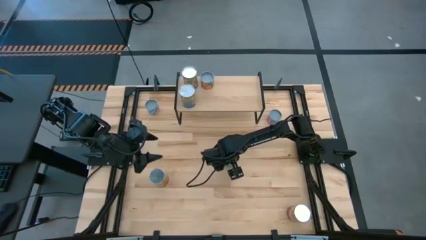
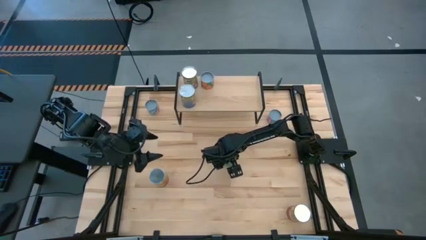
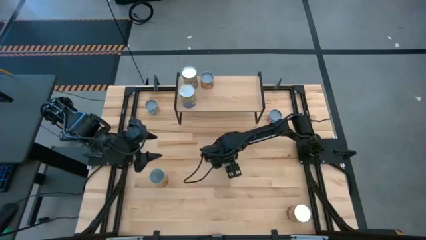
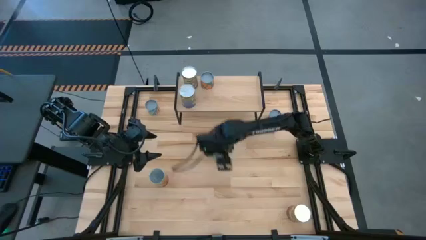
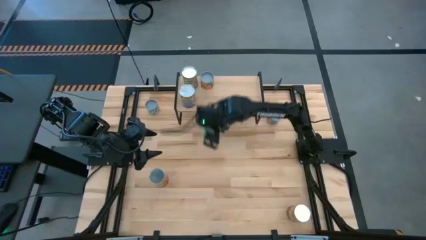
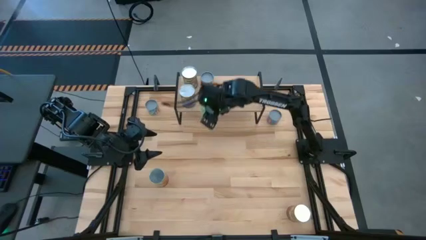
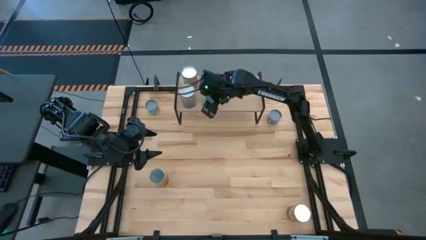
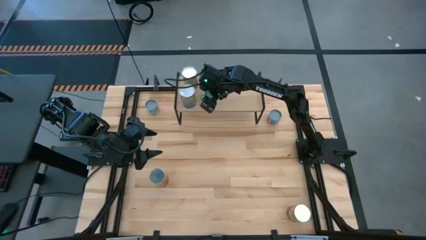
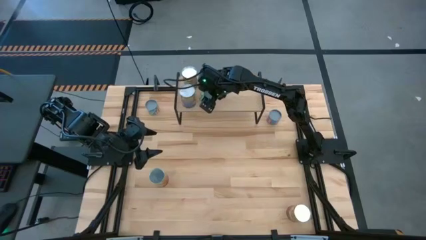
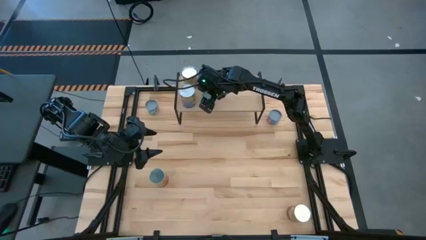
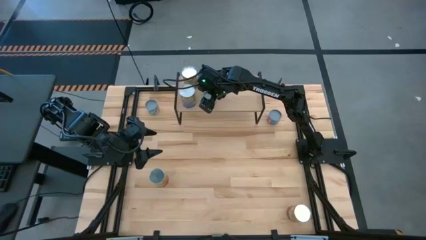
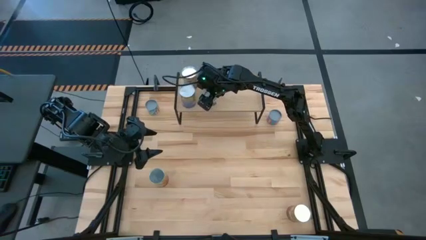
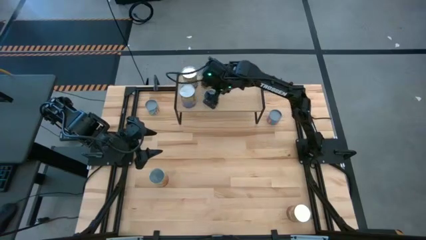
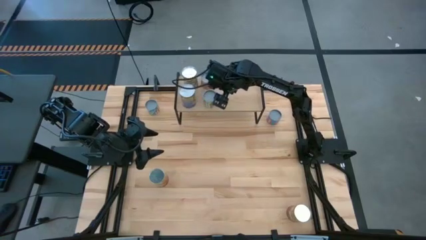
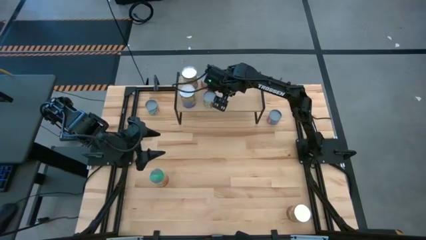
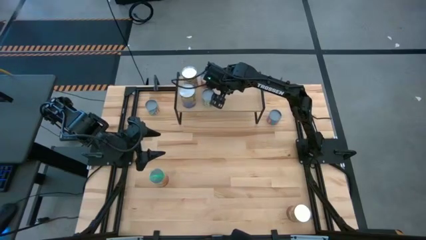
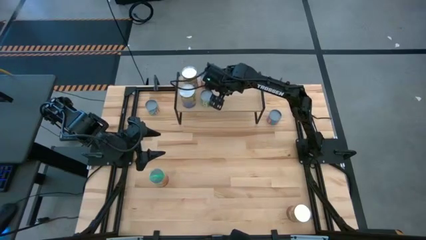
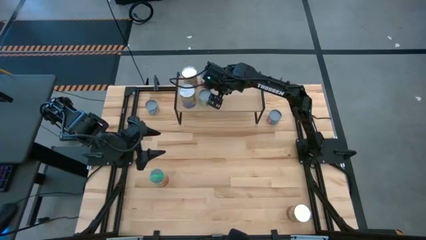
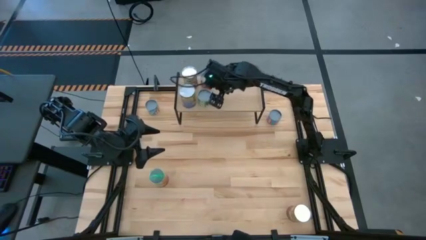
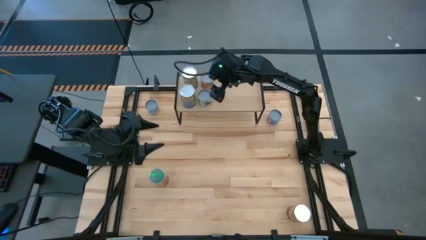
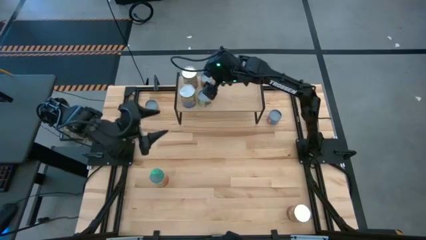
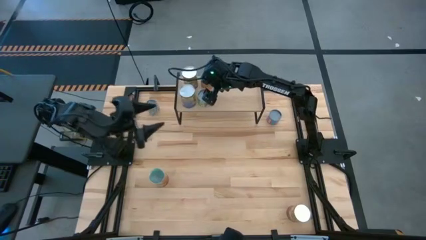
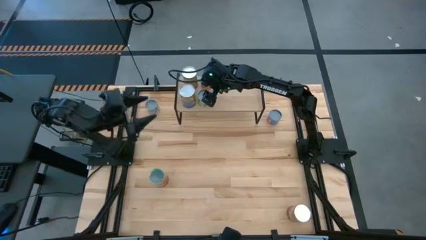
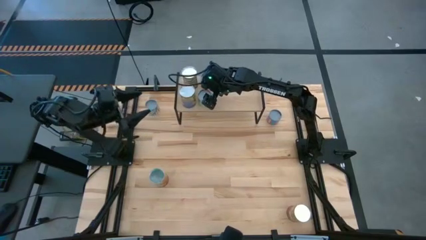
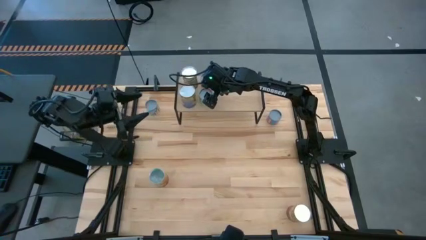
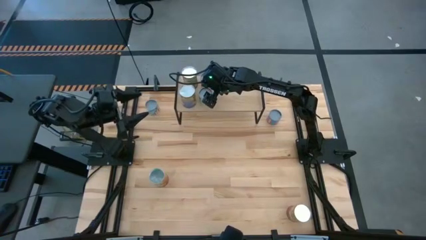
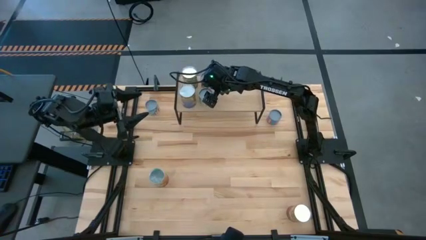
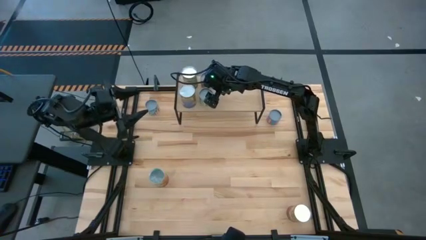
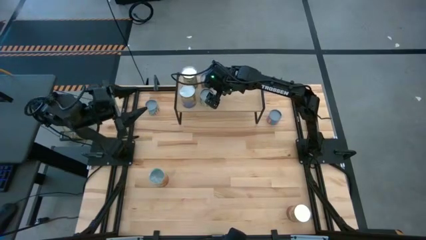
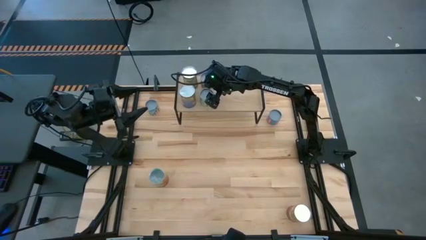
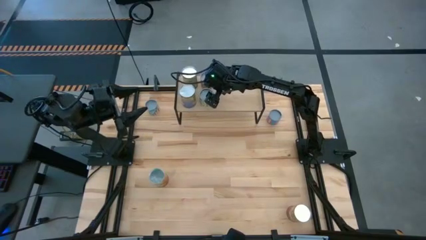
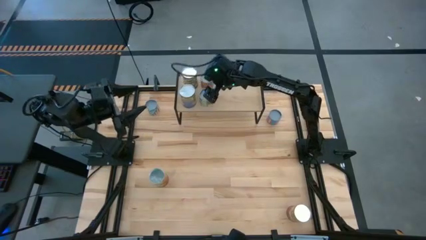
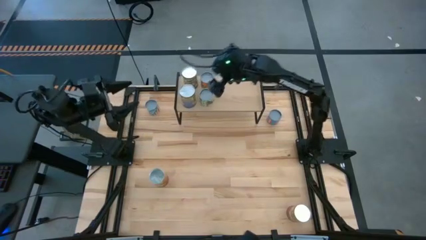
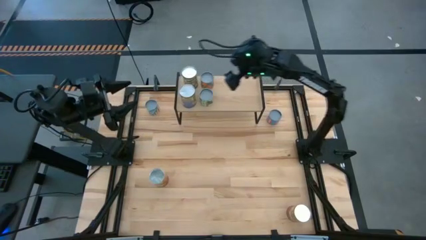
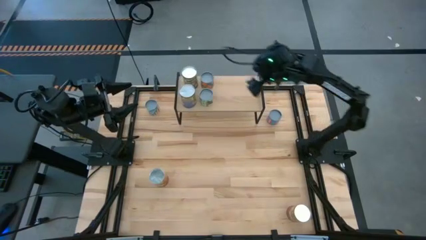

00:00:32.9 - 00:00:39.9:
Task: Pick and place cans onto a shelf
Put the center peas can on top of the shelf

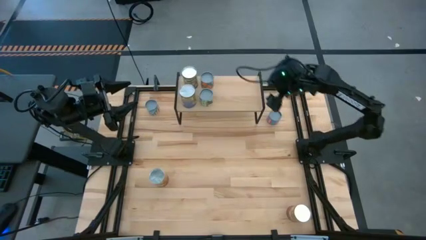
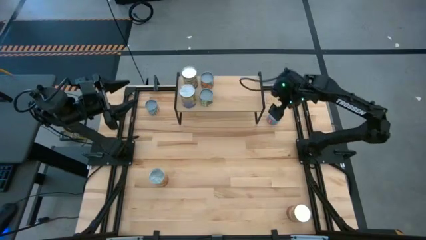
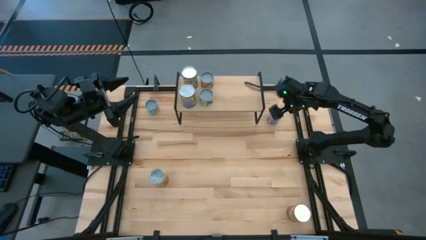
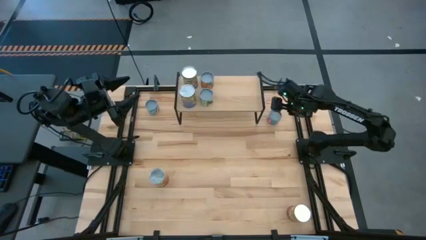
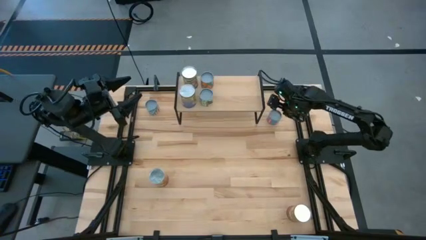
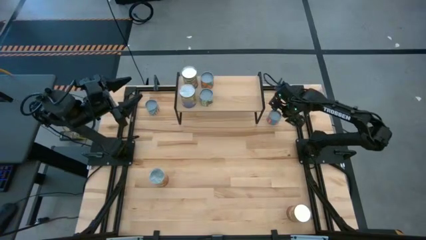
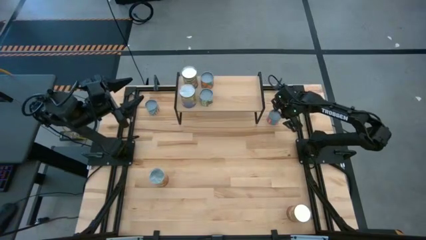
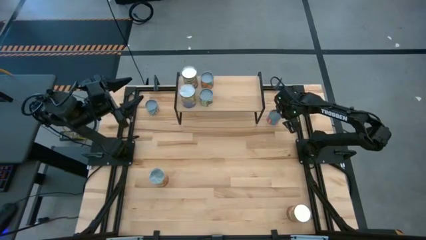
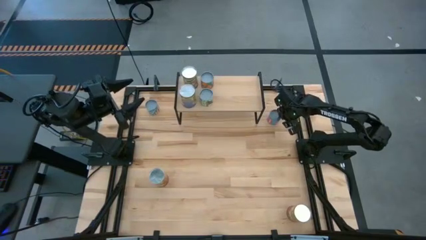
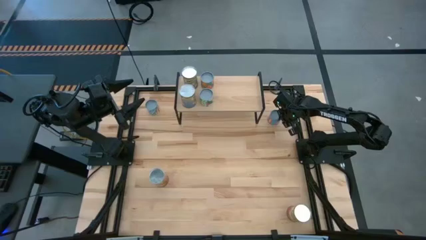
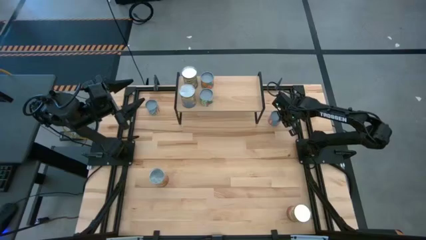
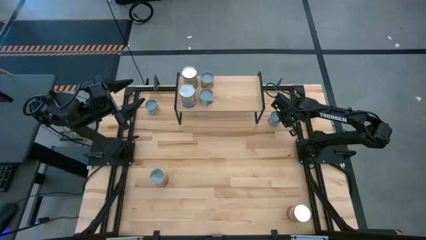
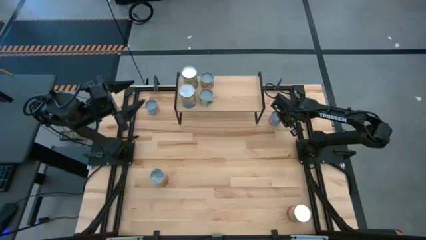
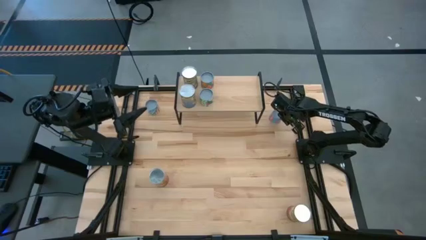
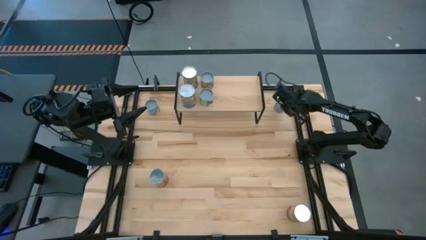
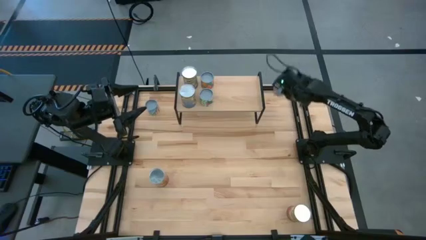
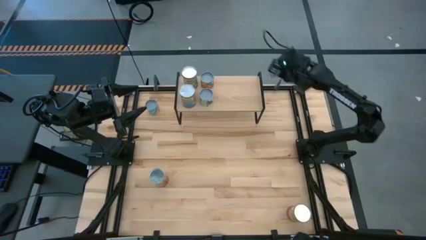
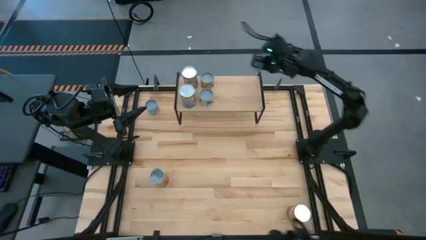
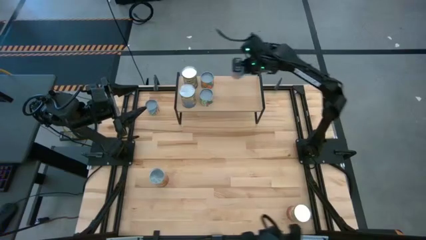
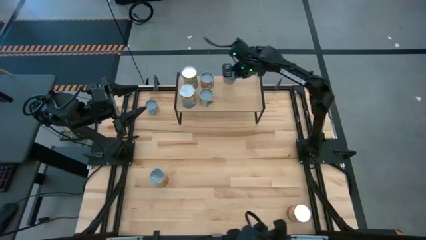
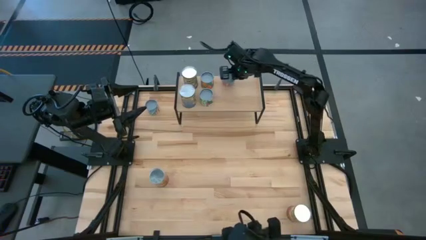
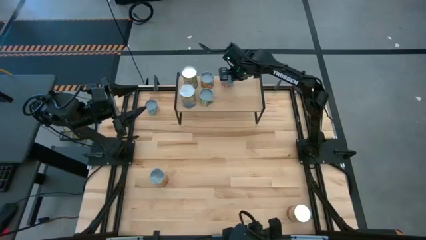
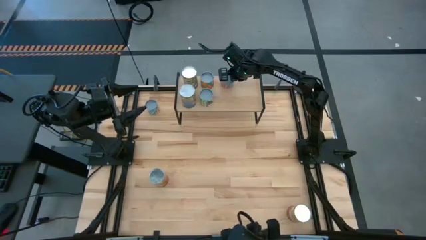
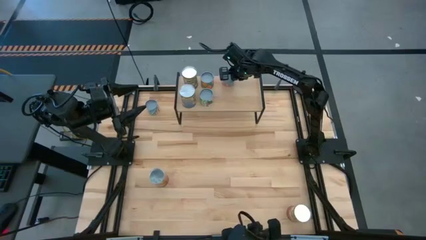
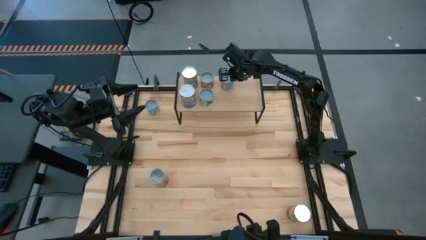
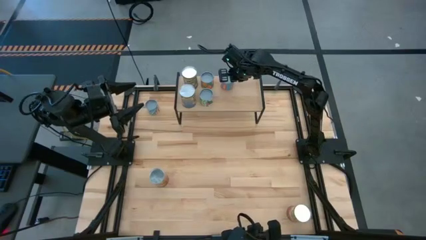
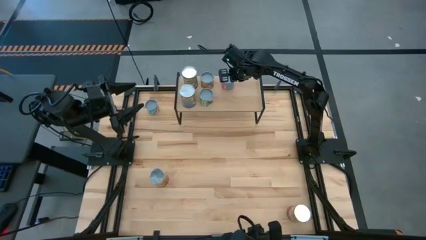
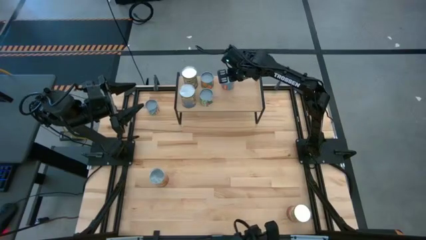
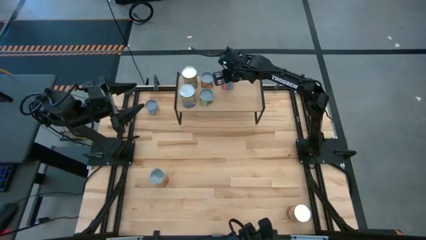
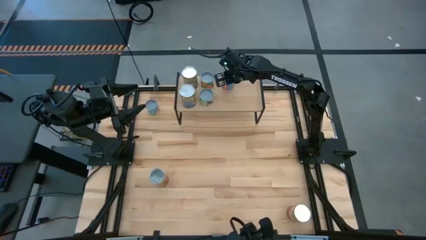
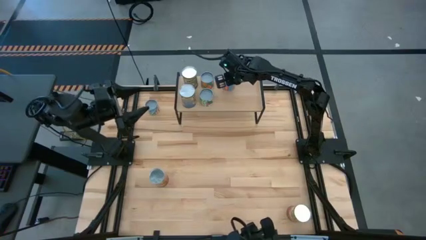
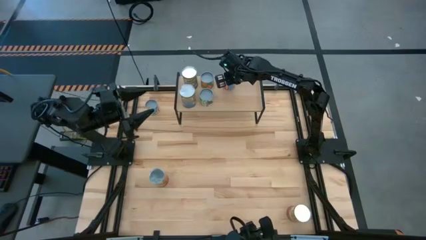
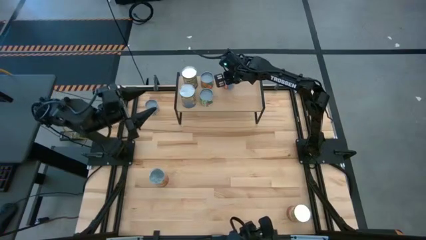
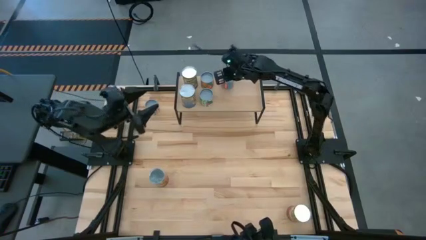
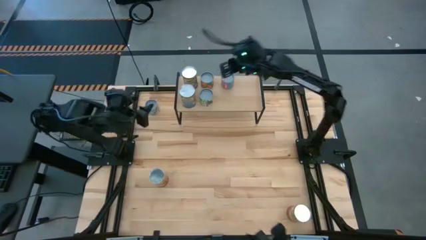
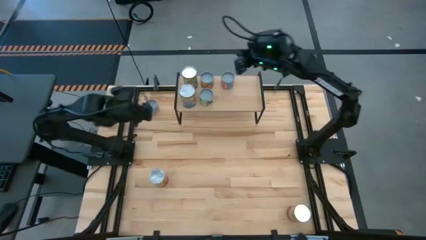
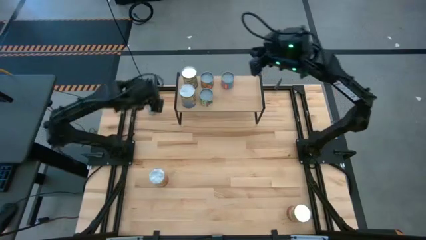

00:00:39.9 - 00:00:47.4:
Put the mix veggies can on top of the shelf

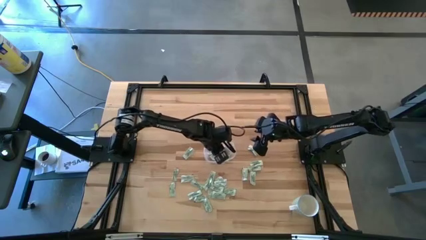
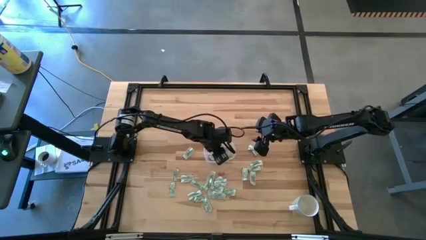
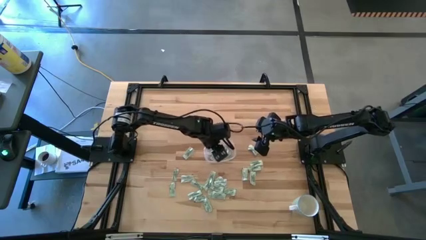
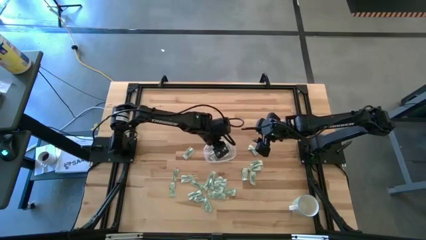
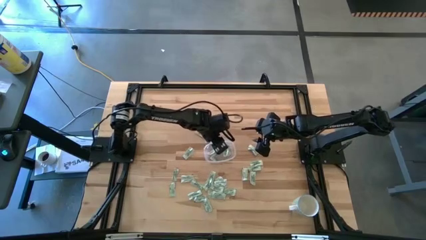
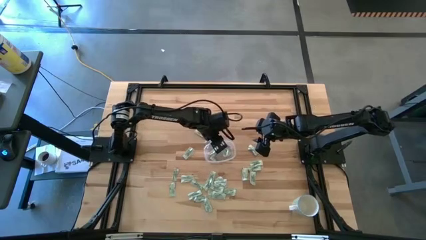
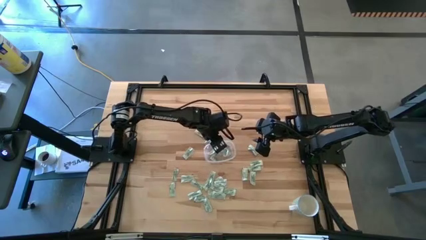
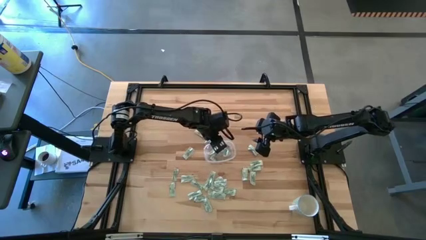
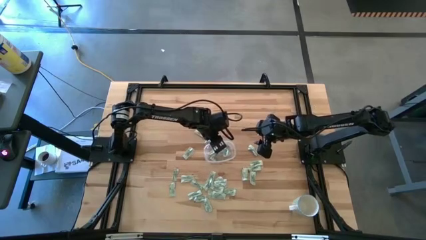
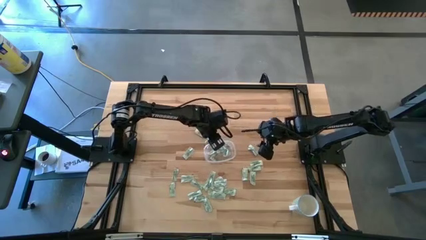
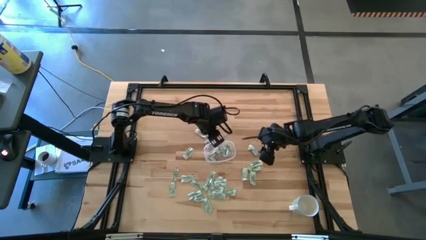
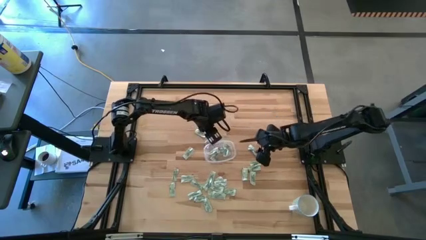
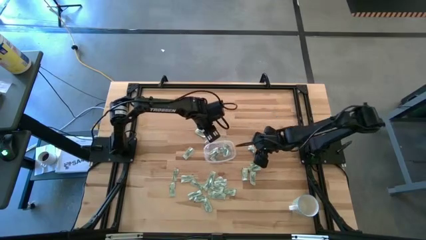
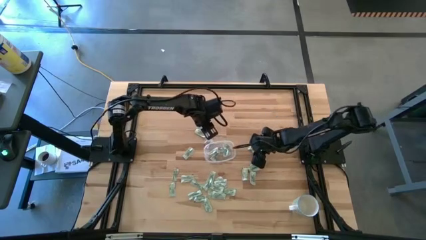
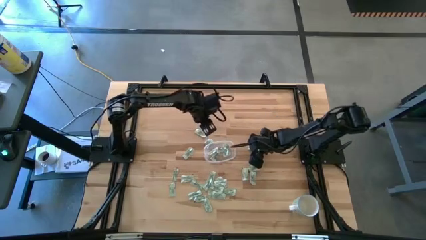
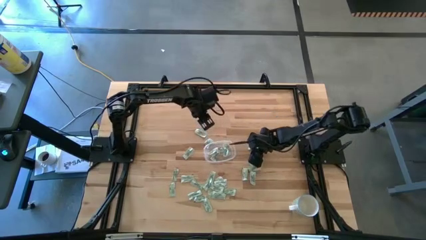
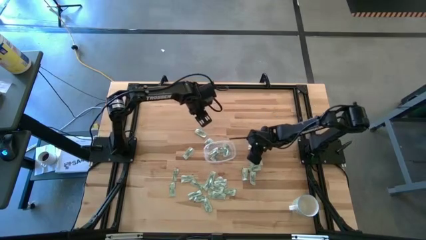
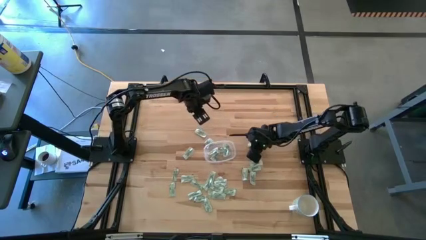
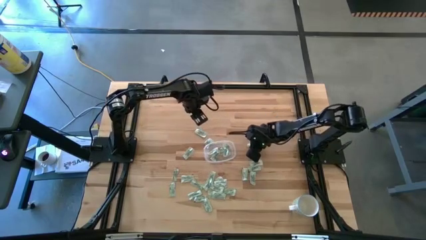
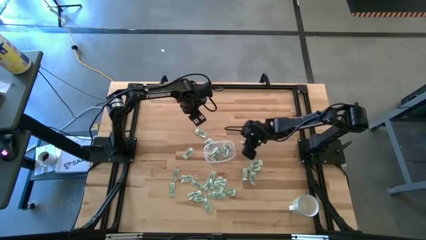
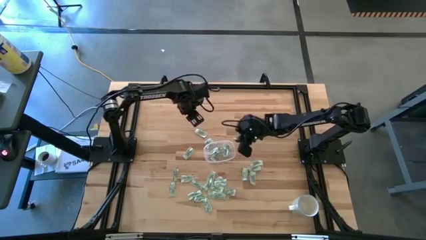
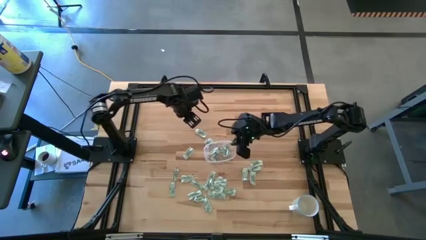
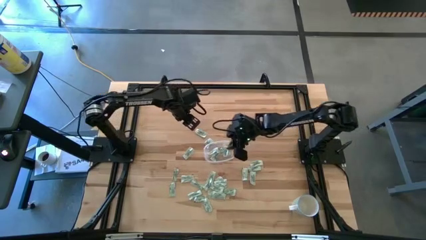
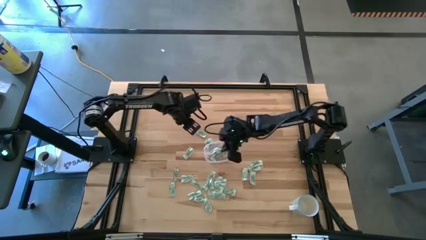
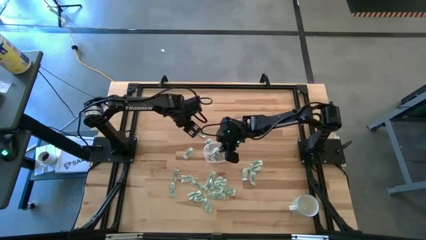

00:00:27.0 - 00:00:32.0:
Task: Pick and place Stevia / Truvia into bins
Put the stevia packet into the transparent container
